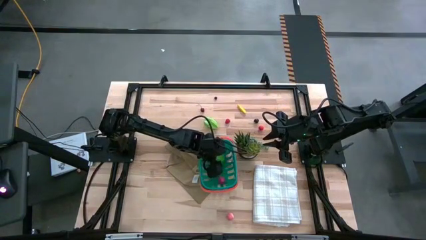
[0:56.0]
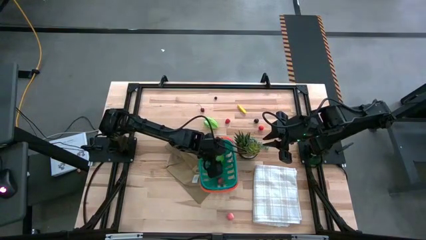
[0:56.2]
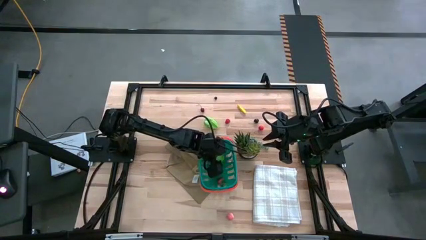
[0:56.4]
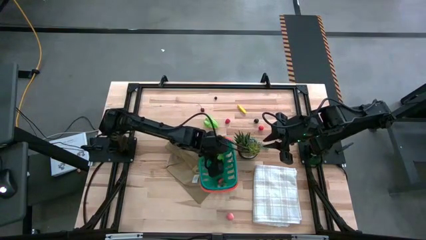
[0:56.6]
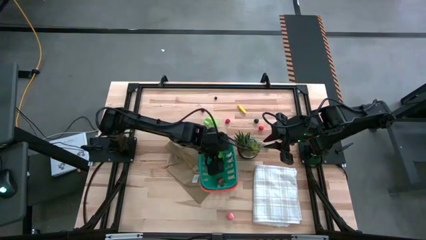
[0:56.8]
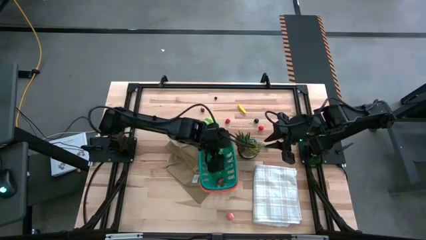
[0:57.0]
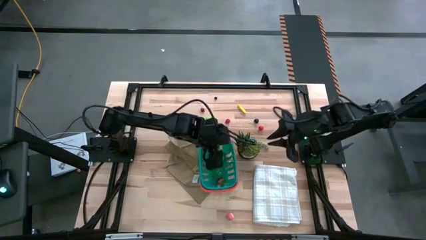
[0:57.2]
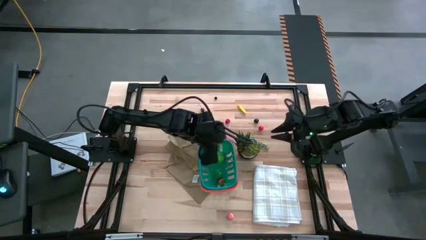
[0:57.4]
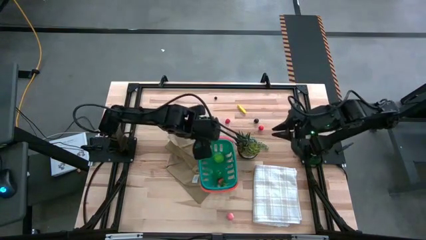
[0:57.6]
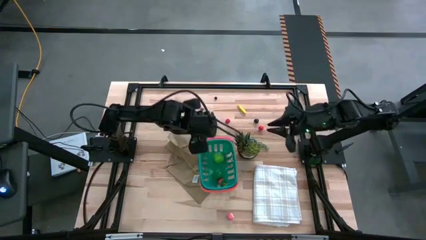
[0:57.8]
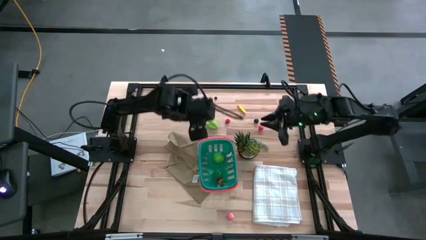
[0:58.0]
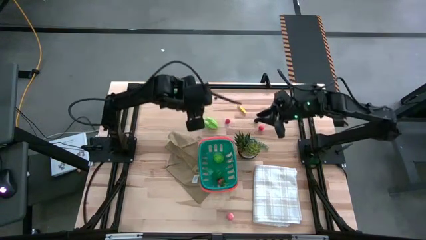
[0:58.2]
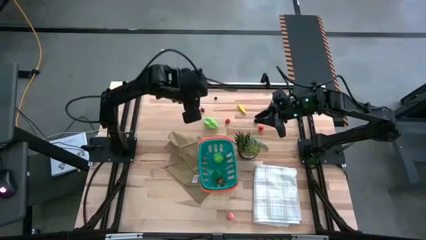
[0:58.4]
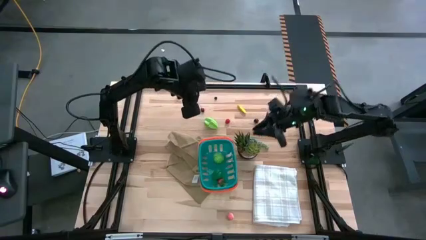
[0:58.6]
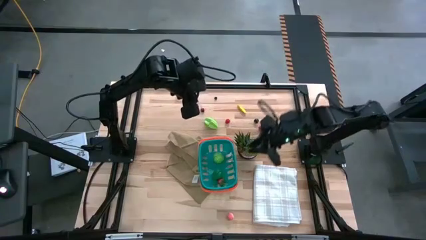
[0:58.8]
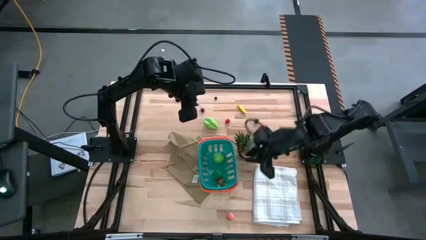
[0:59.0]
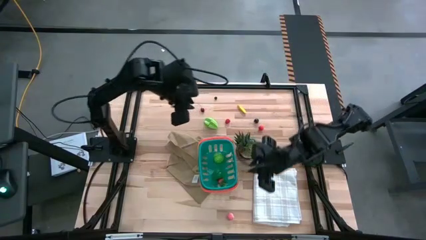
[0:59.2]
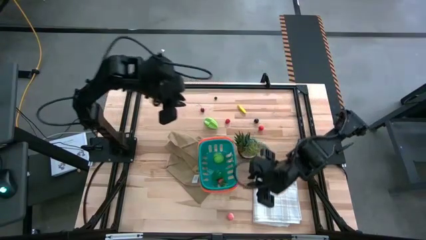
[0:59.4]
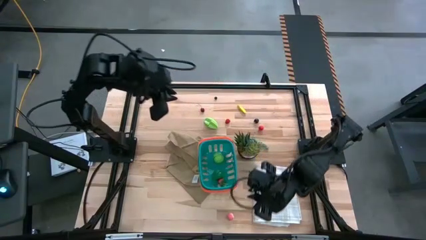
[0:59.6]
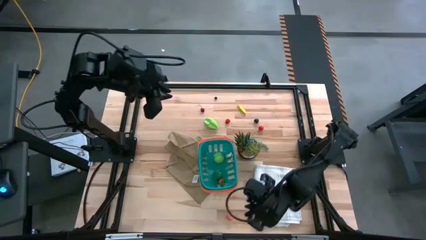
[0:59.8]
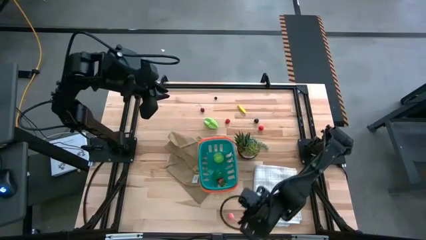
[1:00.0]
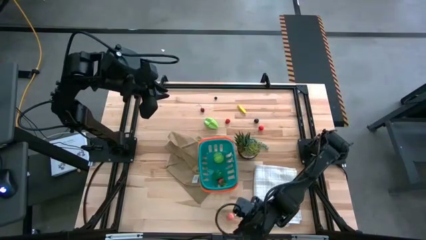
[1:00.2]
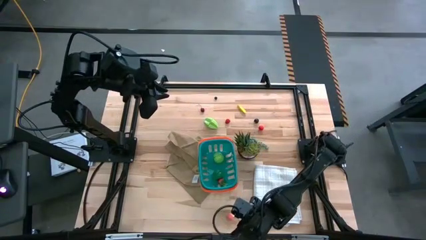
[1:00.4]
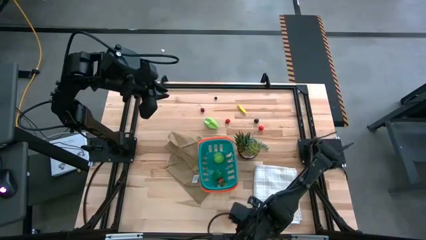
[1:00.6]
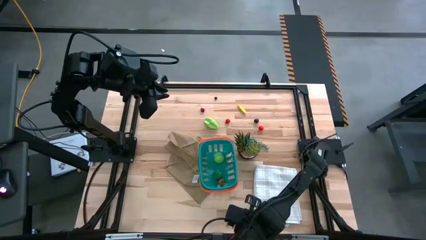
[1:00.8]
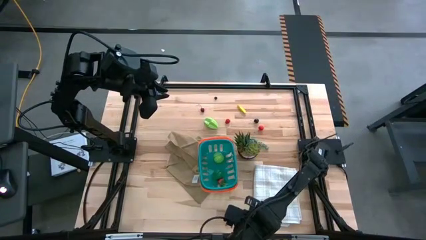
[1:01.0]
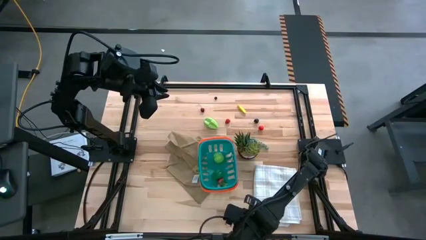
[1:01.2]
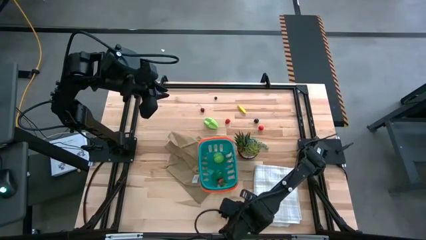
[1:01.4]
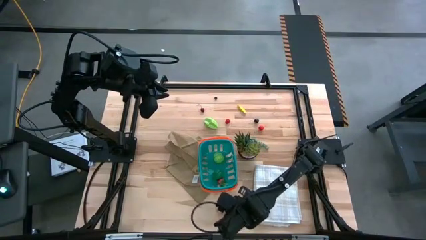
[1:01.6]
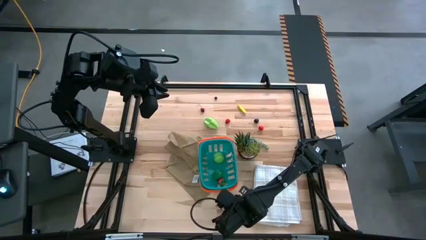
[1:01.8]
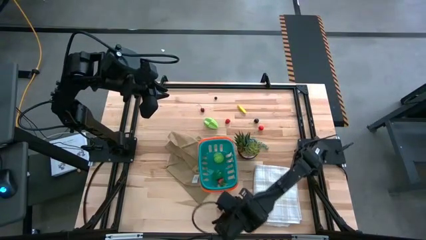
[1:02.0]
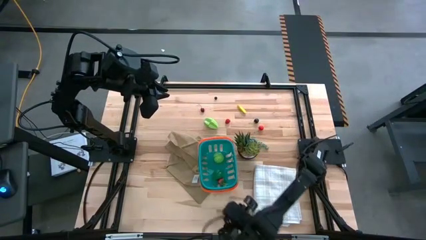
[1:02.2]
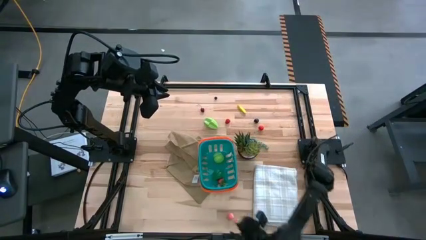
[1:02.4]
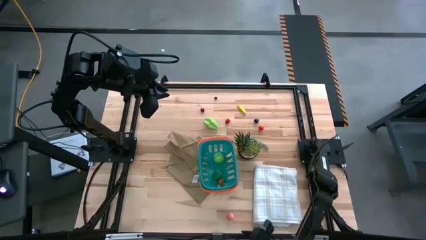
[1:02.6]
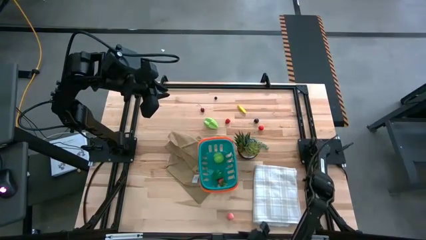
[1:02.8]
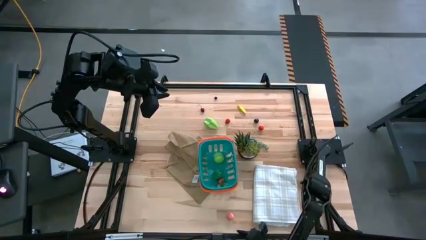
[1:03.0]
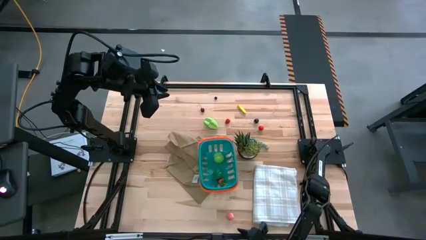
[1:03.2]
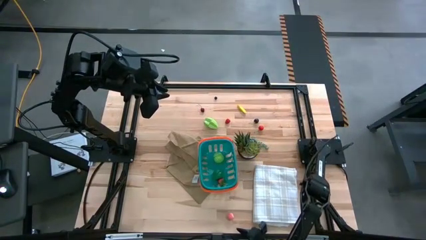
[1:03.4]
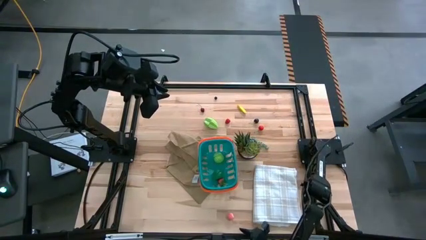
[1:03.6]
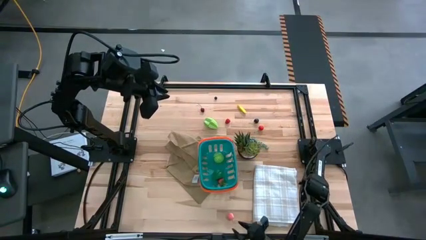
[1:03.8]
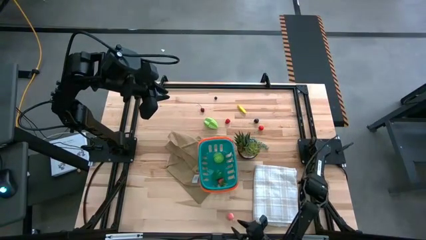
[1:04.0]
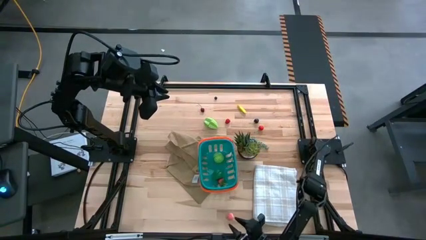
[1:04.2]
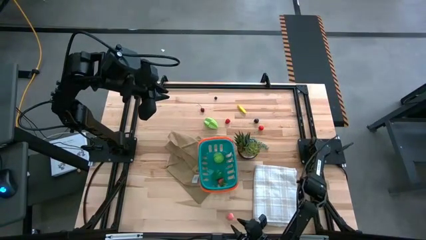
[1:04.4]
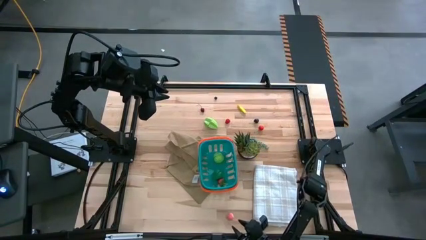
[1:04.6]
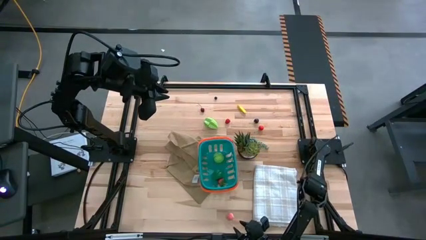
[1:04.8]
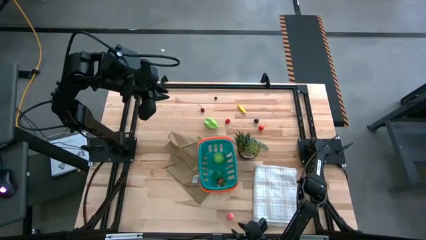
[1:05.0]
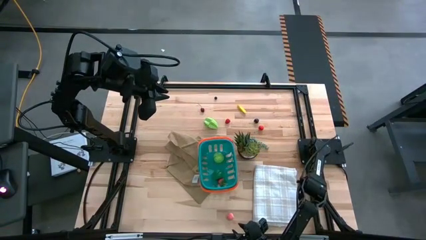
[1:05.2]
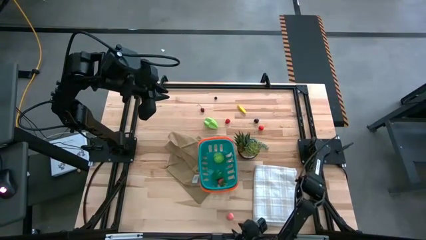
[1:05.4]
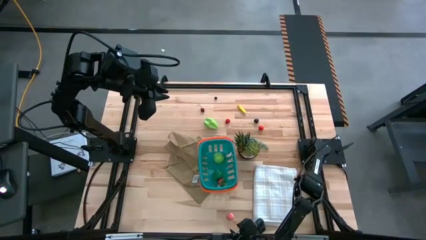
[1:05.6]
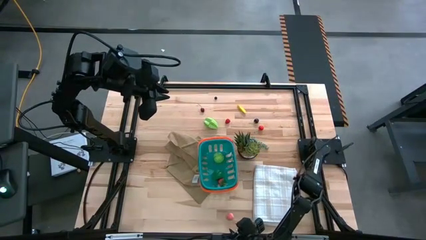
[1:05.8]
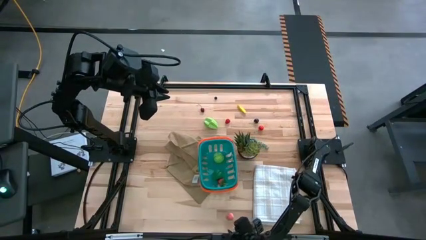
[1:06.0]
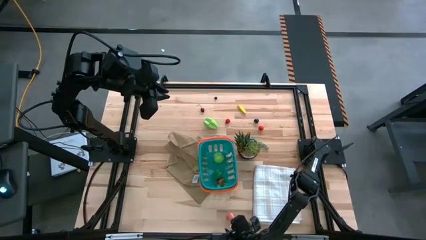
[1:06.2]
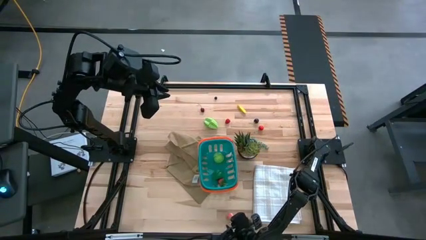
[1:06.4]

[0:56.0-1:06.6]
Task: Pick and placing Produce into tupperware
Put the pink peach into the green basket
